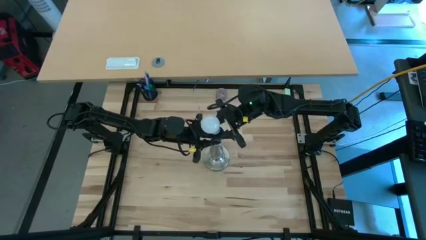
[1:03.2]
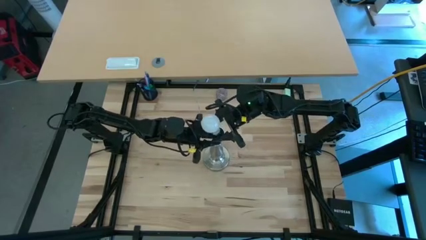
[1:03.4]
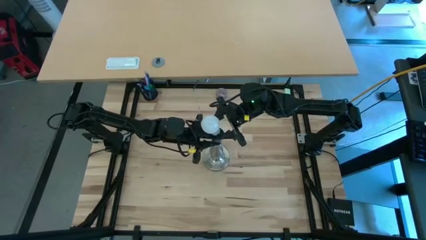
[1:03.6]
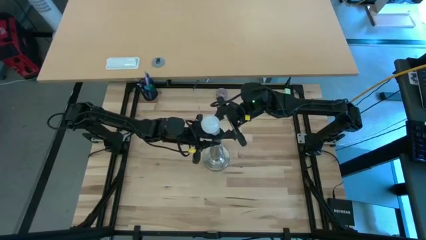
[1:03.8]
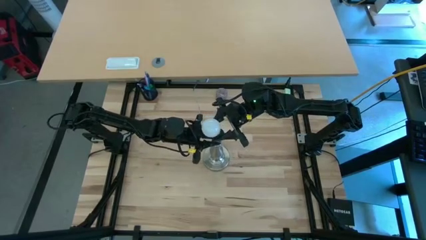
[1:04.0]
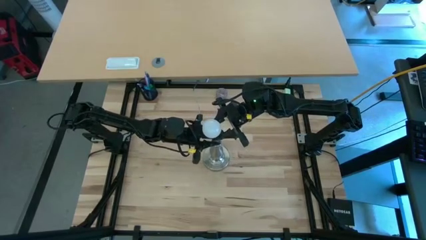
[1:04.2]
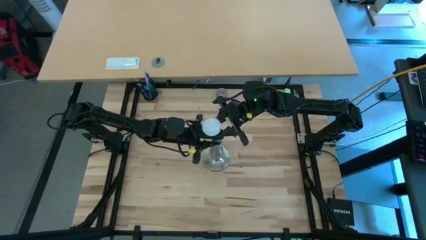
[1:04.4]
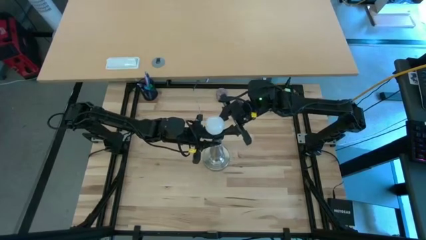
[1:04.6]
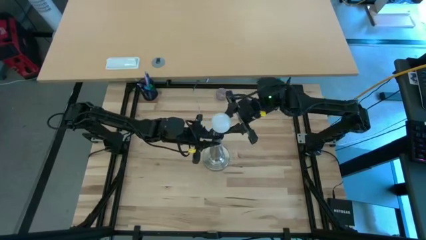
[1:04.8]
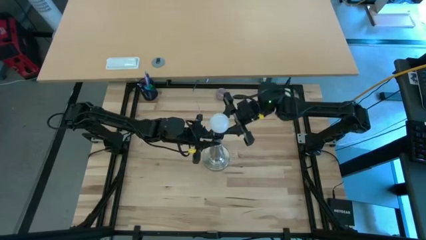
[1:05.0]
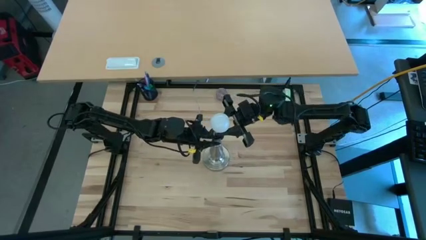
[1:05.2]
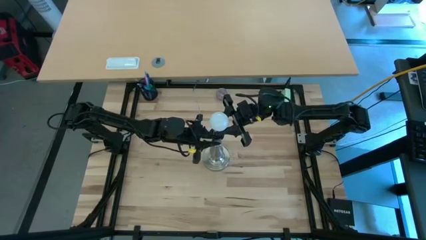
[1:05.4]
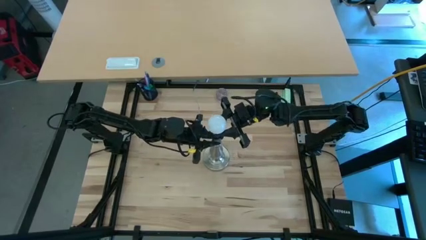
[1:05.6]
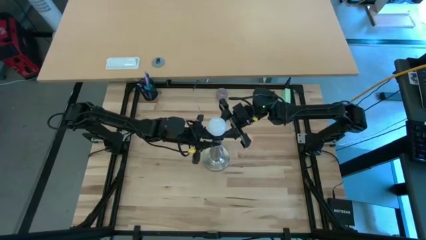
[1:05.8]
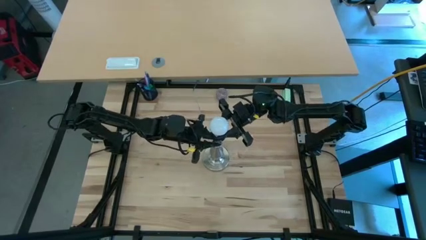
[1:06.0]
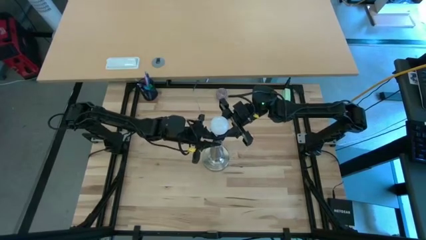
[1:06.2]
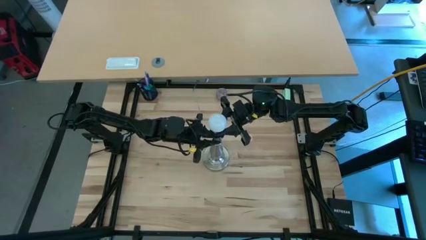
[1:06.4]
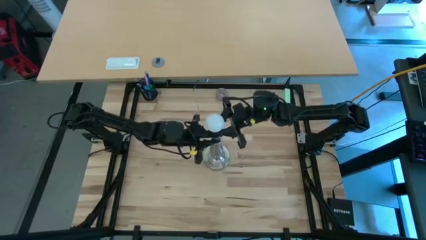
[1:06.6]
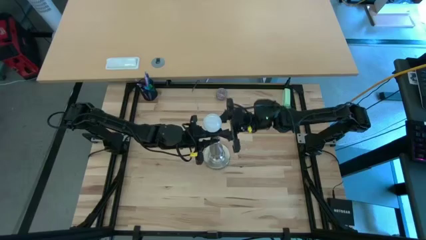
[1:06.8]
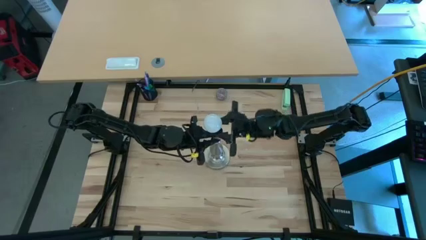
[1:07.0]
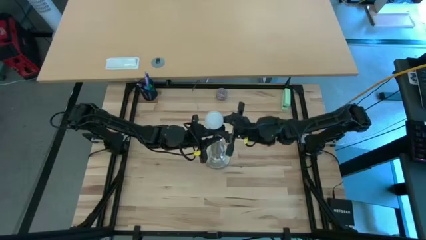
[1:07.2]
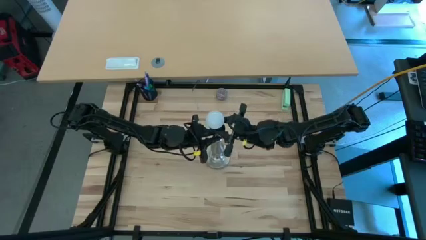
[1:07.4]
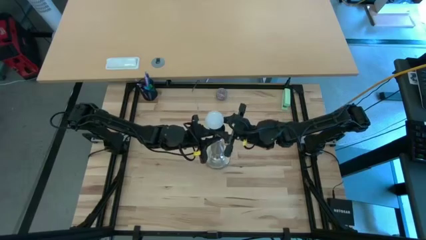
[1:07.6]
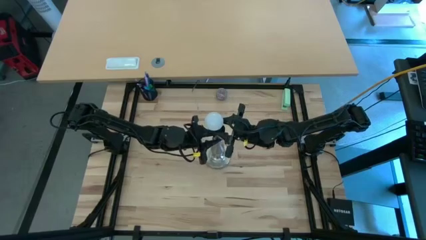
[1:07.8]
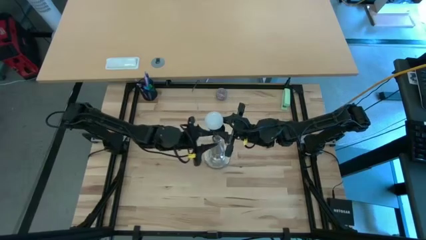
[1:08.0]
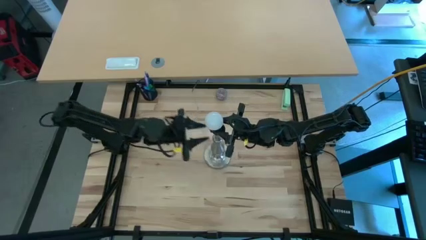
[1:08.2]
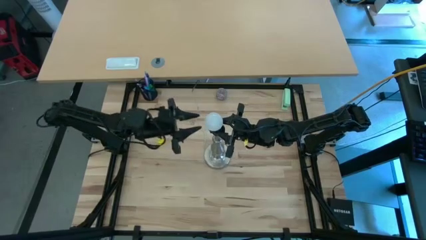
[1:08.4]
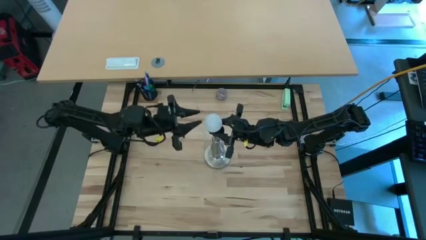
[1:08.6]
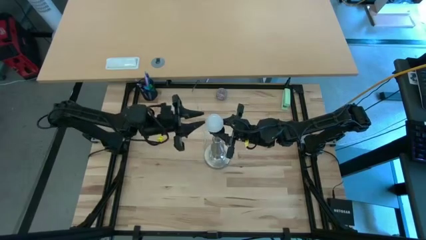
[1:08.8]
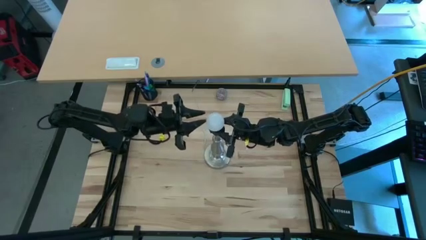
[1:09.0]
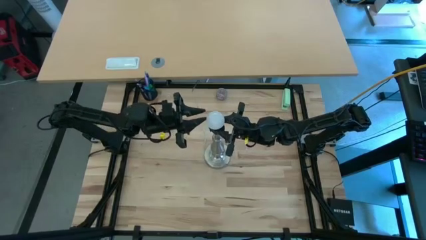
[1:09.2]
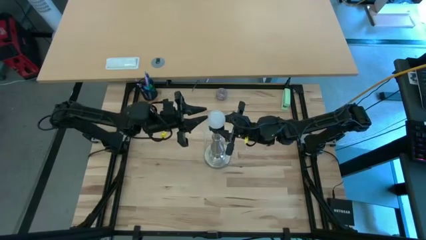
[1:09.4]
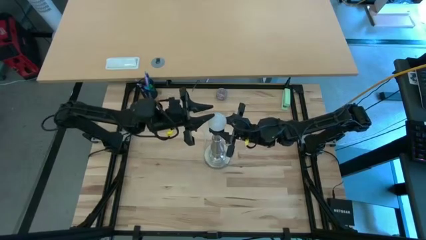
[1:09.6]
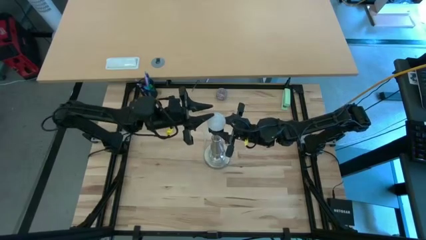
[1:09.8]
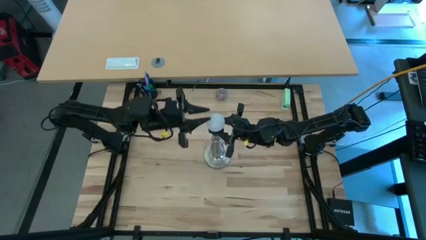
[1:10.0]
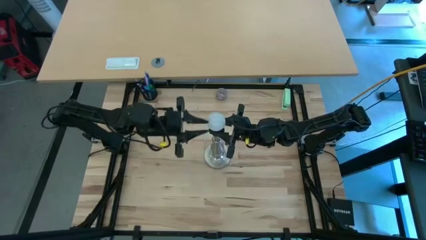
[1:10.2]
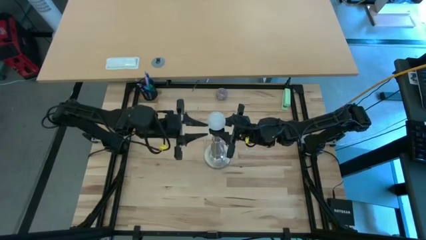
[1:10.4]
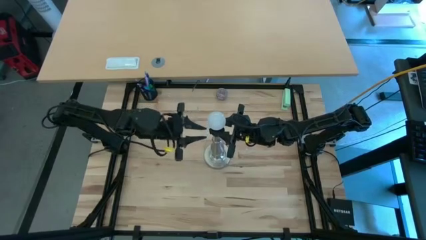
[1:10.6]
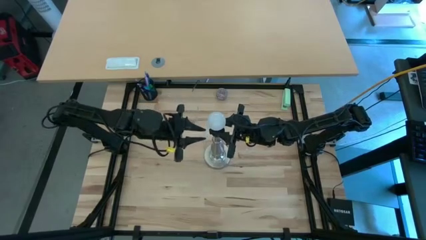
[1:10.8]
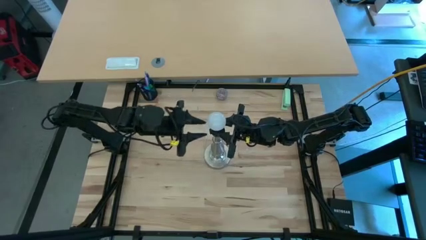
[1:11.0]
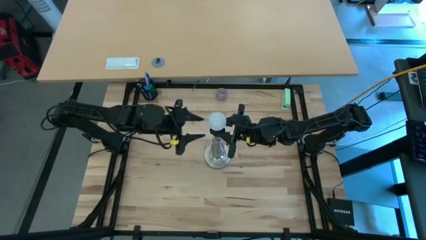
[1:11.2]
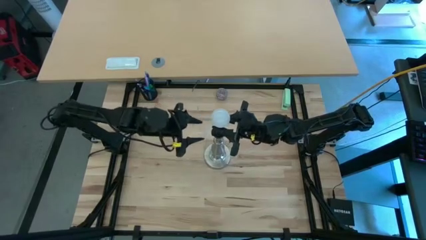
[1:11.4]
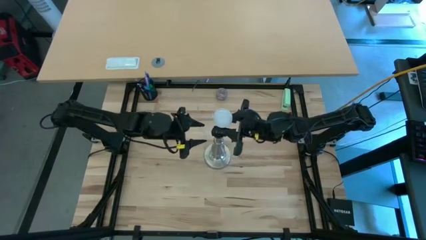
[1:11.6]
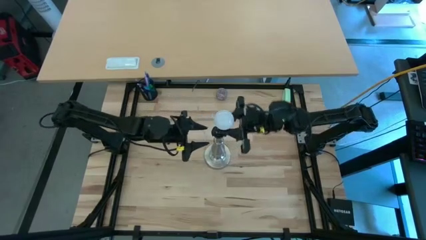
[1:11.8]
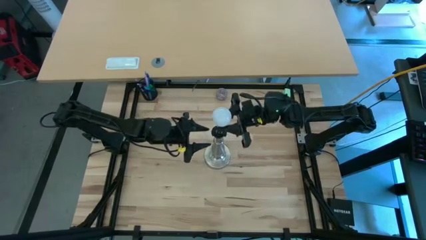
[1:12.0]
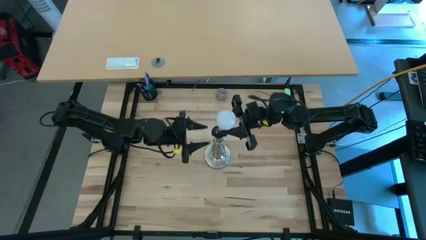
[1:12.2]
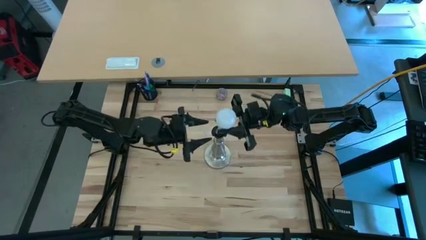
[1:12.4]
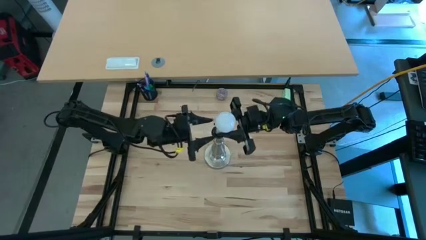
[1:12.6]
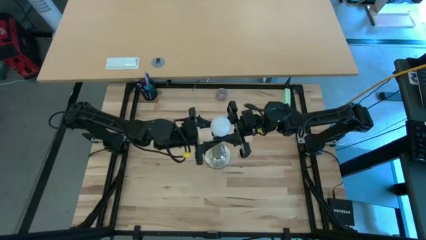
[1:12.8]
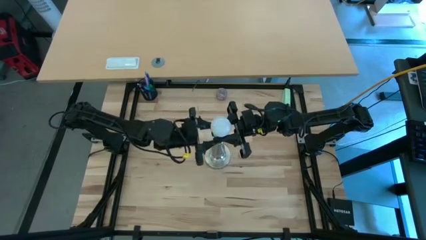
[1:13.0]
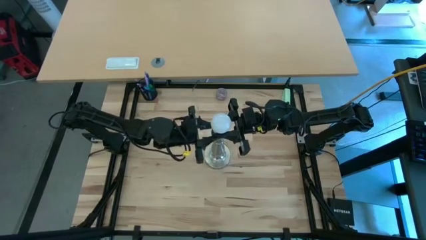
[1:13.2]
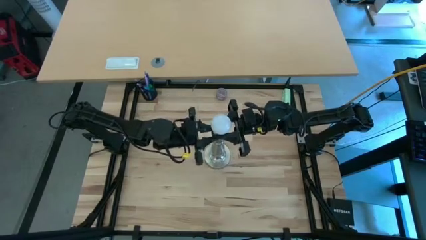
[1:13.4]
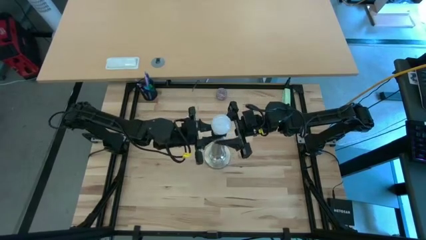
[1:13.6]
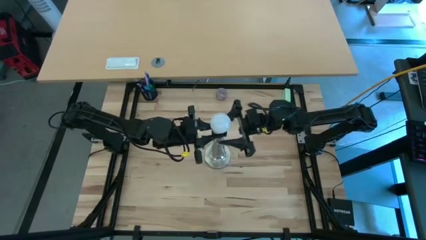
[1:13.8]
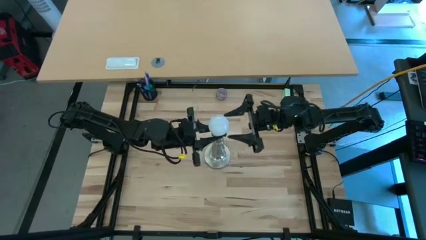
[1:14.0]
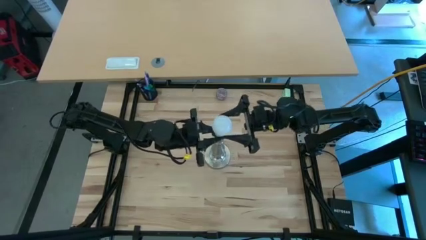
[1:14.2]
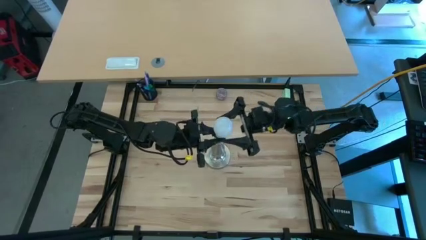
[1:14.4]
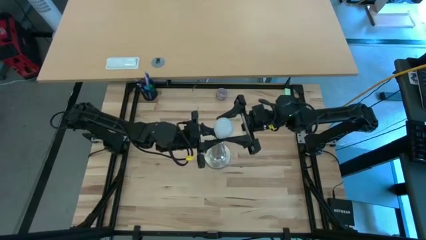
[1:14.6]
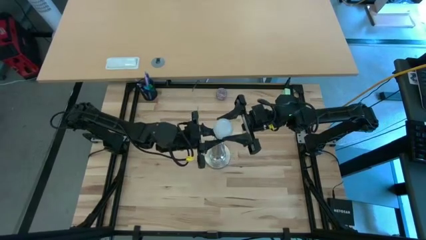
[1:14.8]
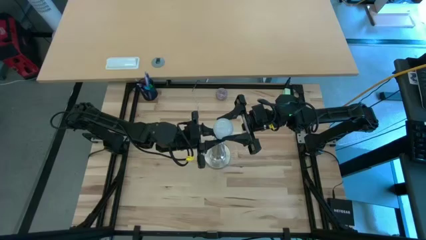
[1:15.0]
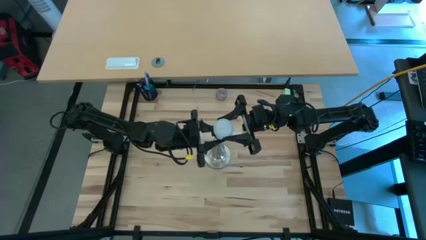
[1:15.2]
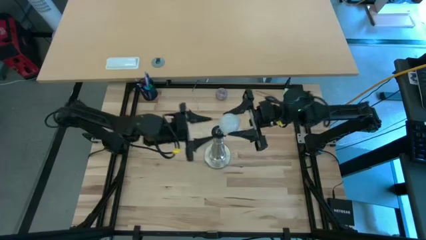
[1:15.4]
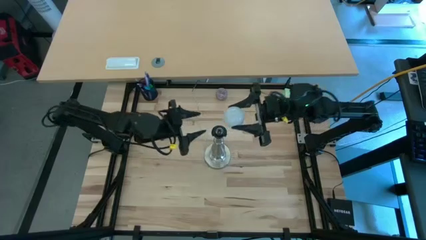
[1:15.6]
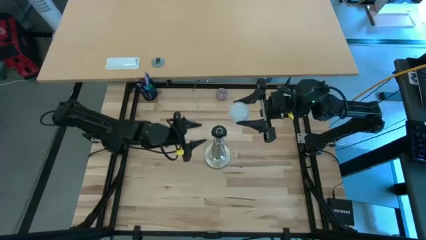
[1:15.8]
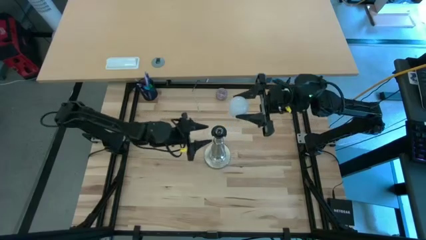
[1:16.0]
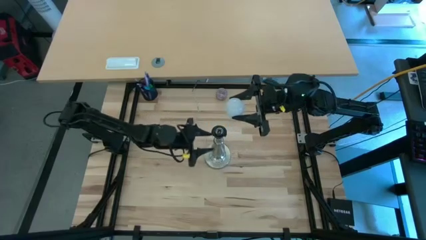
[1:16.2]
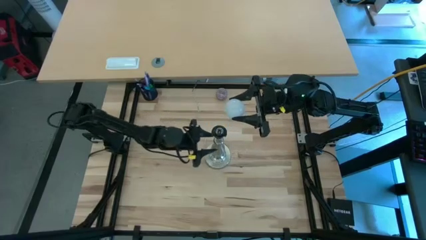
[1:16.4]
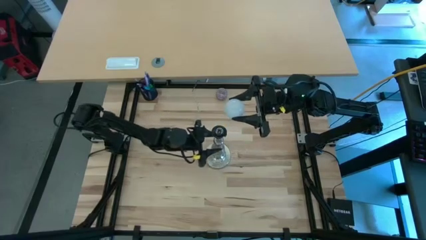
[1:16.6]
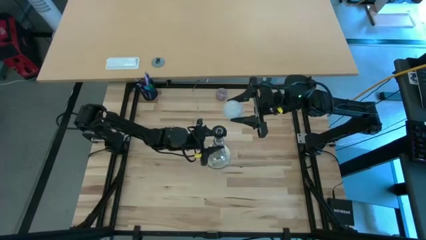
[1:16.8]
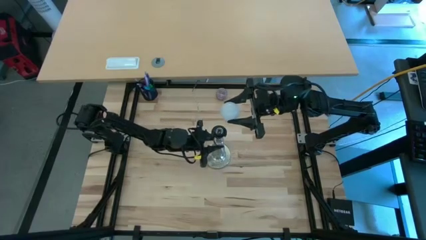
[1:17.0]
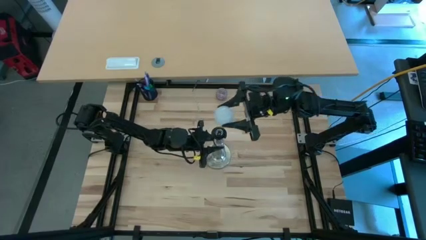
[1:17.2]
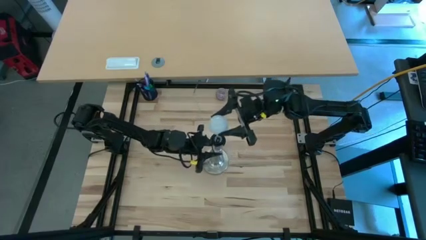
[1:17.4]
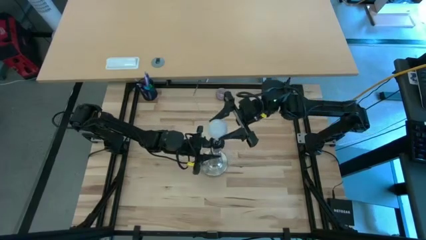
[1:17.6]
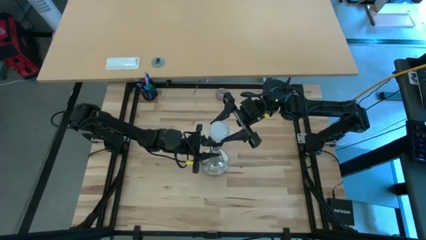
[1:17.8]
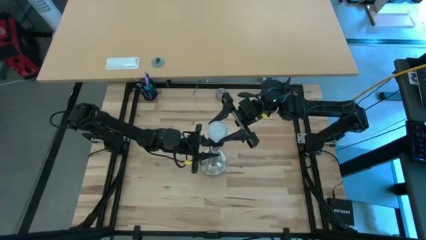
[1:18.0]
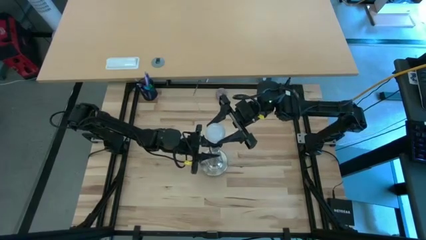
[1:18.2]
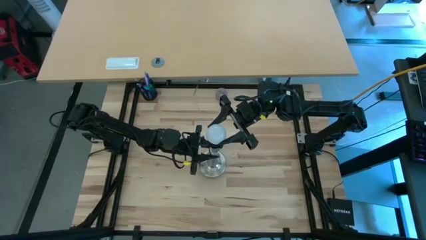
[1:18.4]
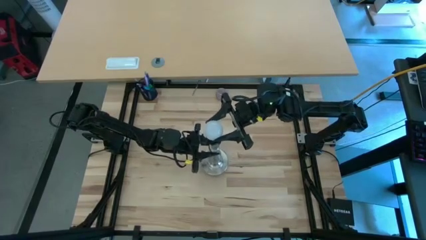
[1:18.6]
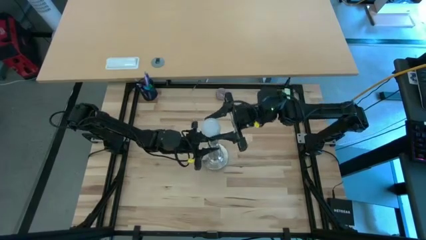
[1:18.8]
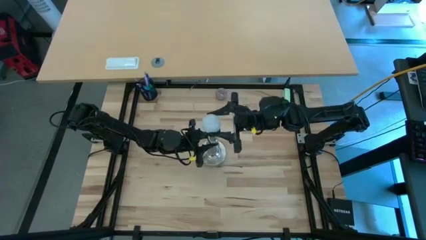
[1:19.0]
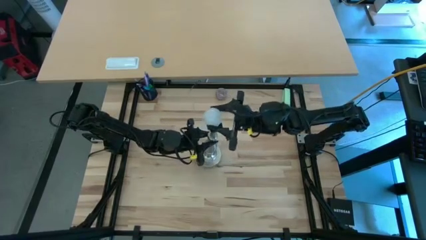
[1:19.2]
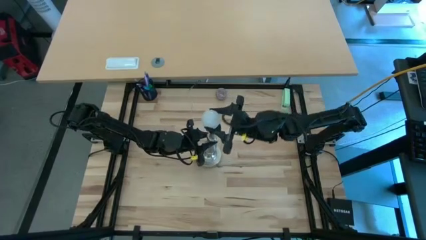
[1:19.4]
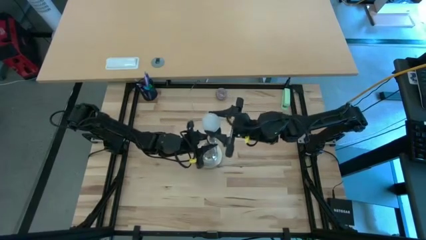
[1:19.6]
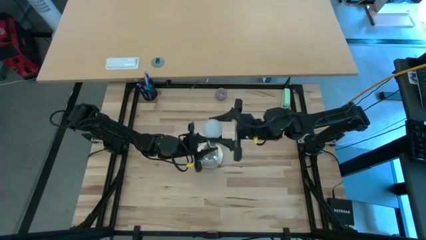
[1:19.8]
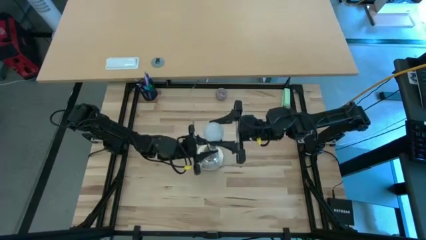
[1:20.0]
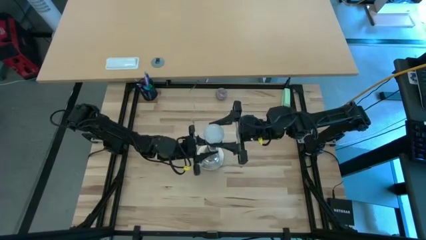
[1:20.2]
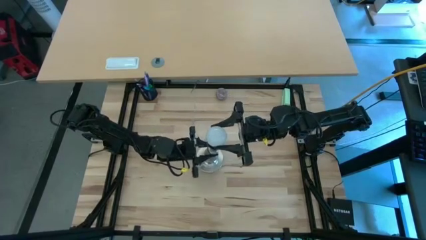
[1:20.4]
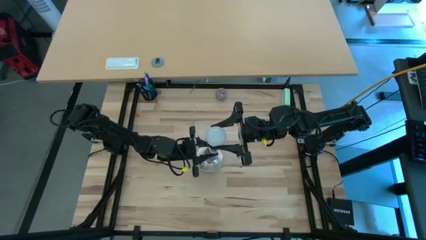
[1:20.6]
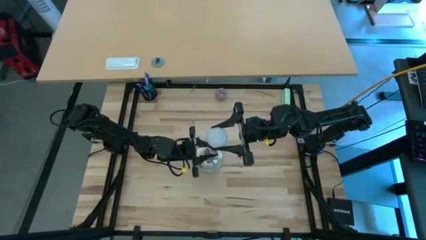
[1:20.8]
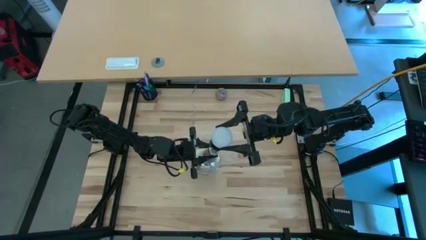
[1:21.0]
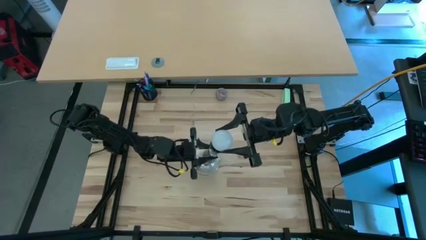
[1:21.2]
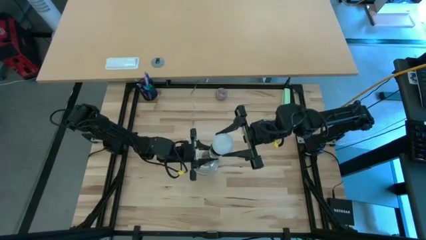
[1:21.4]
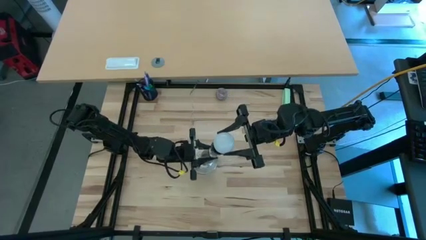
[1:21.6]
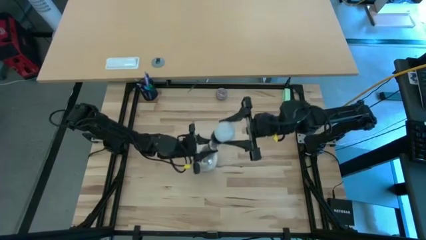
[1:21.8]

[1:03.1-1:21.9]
Task: Screw lightbulb
Insert the lightbulb into the silver lamp
